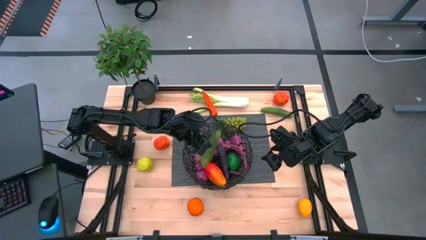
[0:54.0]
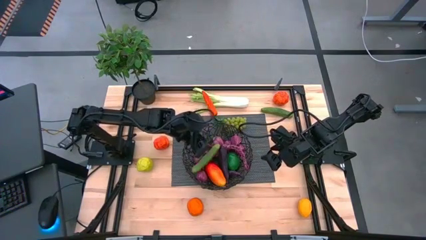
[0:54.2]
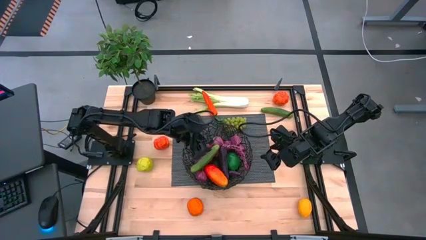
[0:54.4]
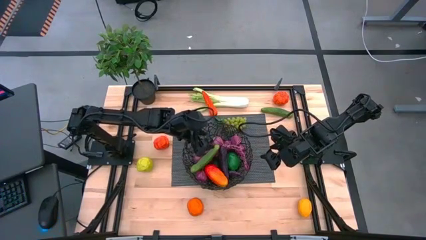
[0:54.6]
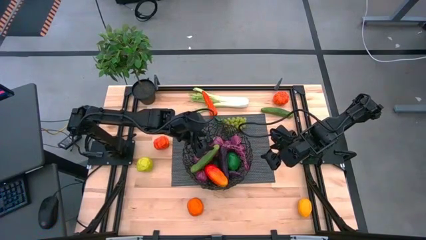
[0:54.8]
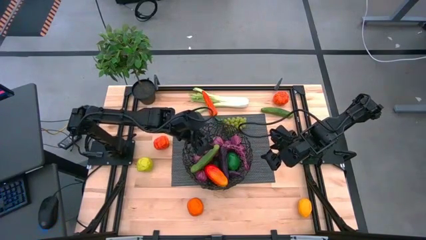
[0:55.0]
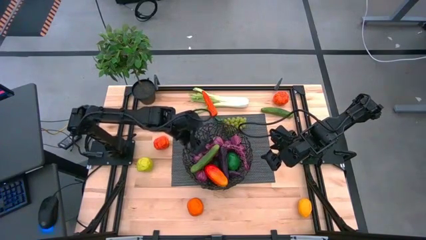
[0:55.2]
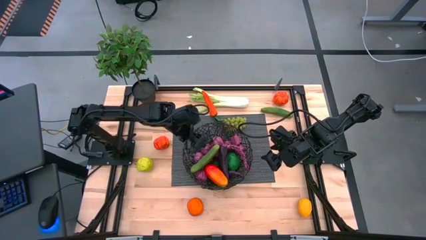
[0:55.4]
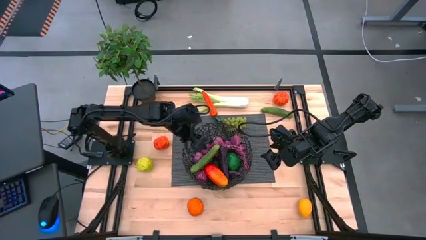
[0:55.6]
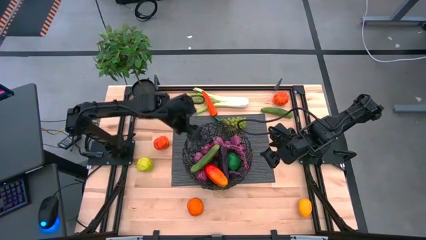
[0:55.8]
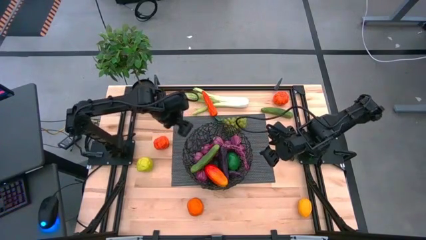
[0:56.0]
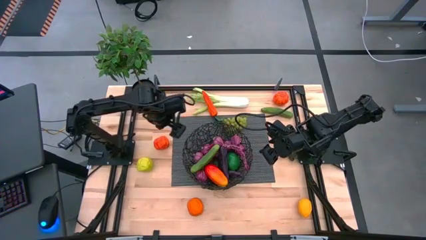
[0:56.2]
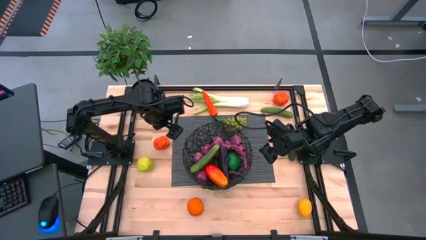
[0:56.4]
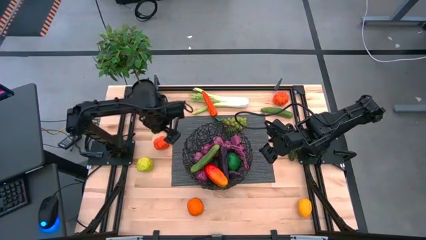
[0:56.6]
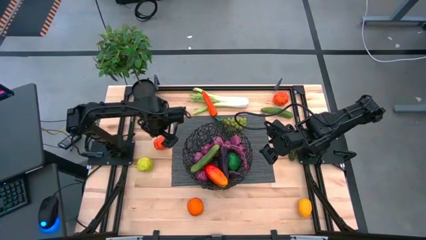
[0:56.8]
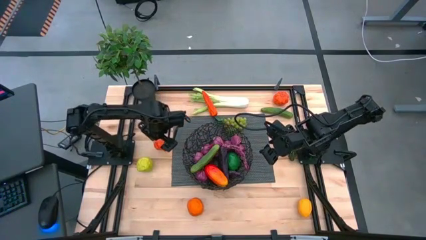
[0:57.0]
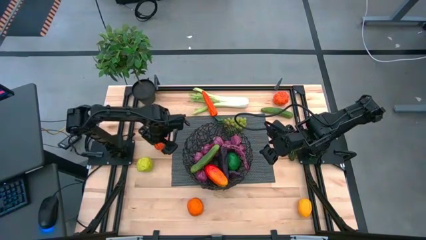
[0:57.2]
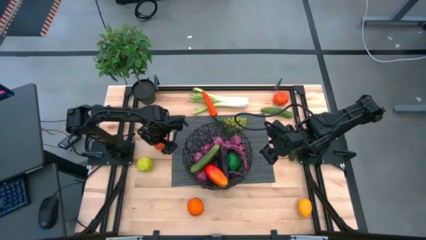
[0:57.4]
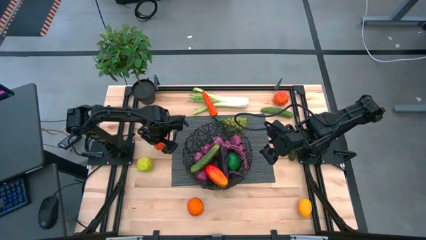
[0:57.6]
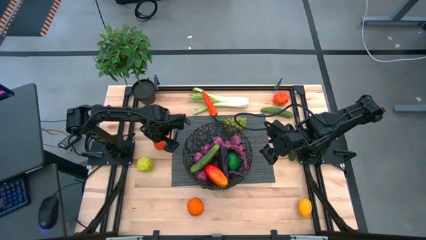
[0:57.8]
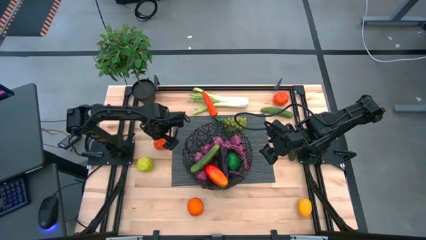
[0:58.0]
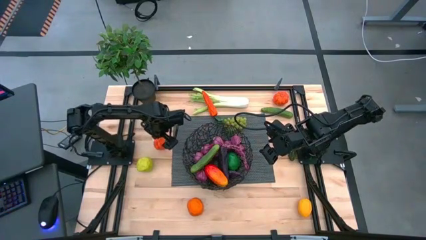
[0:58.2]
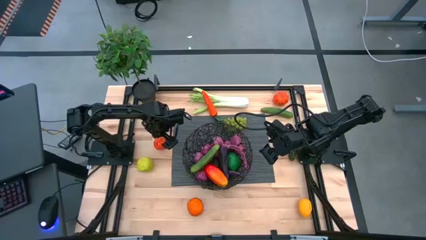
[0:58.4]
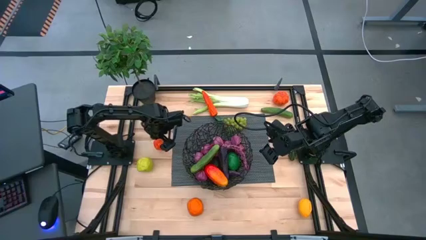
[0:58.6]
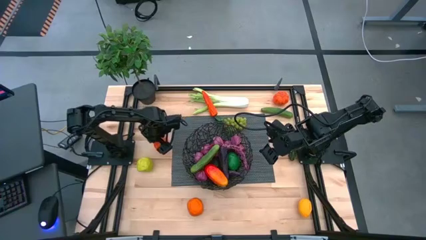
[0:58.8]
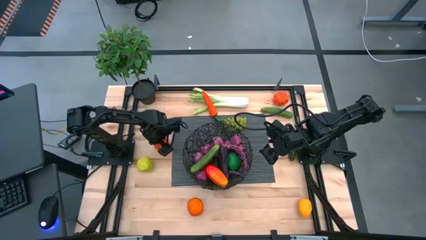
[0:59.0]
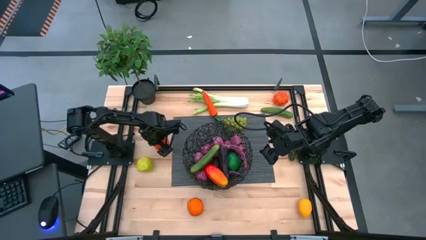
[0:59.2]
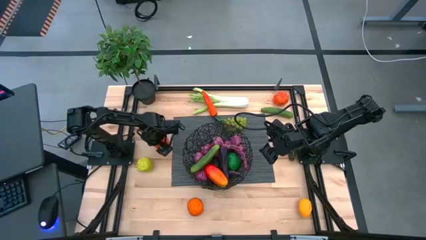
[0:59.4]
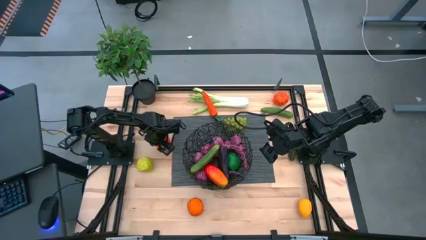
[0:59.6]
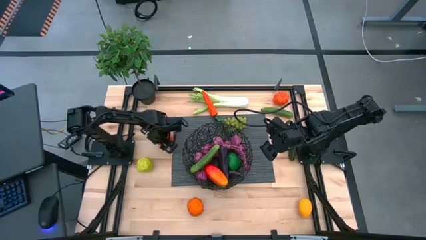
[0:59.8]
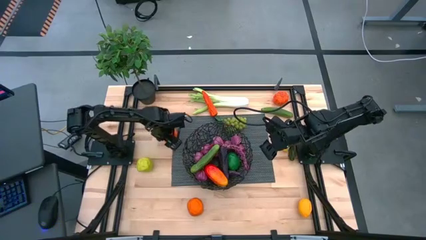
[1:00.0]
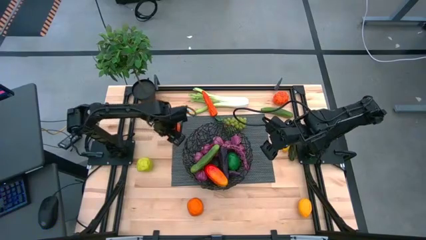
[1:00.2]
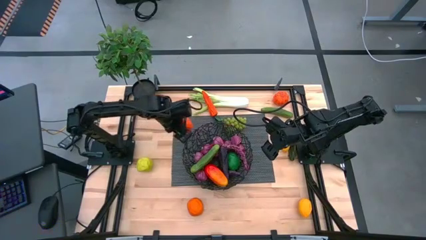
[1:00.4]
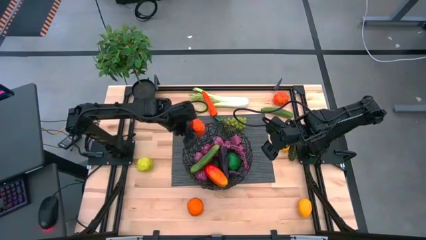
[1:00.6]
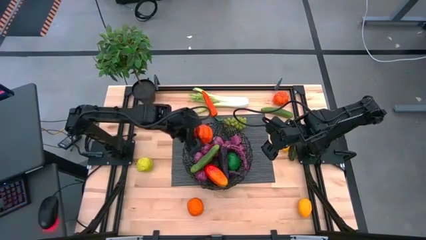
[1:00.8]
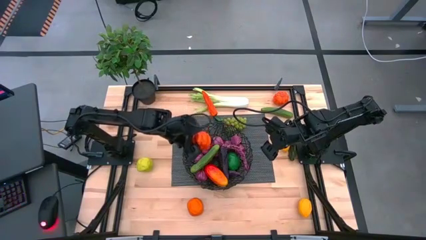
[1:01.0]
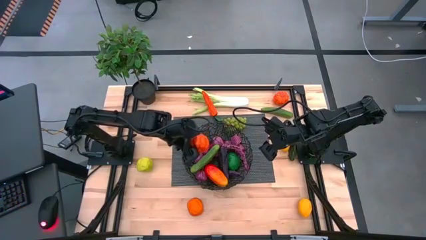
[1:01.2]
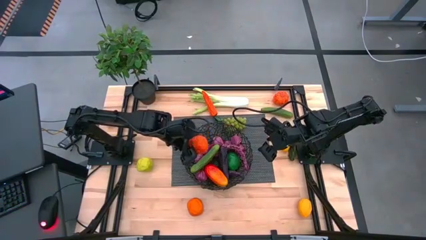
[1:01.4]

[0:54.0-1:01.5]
Task: Build produce basket
Put the left orange pumpkin into the black wire basket

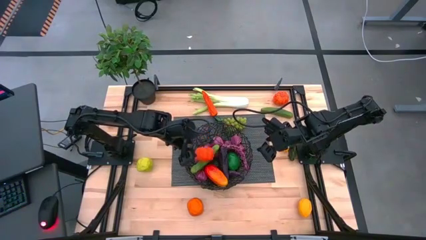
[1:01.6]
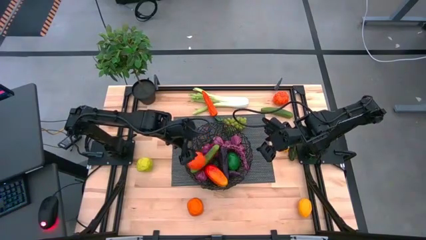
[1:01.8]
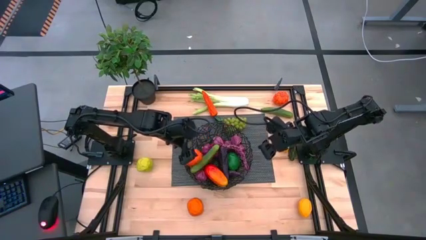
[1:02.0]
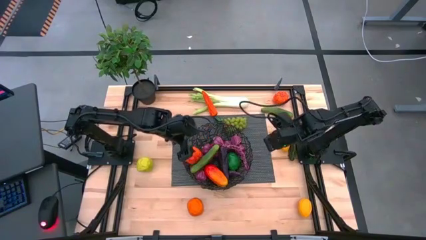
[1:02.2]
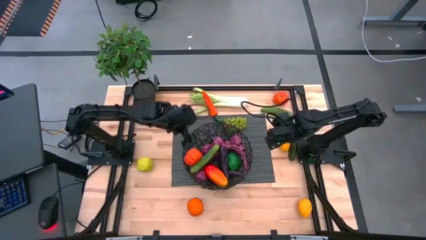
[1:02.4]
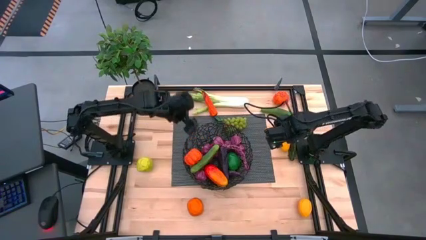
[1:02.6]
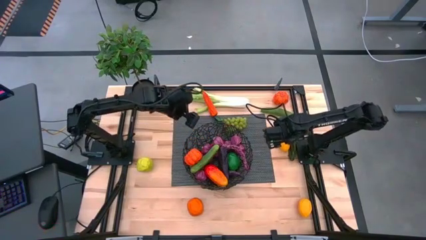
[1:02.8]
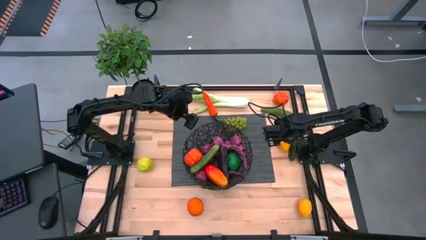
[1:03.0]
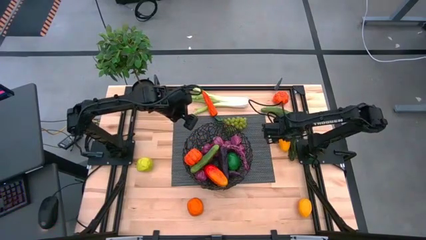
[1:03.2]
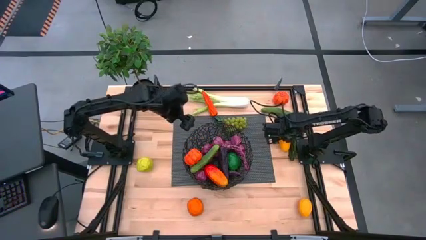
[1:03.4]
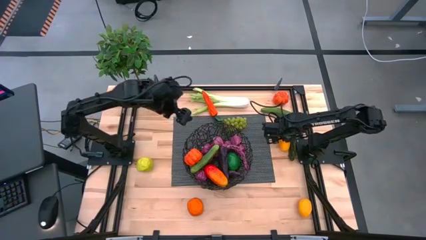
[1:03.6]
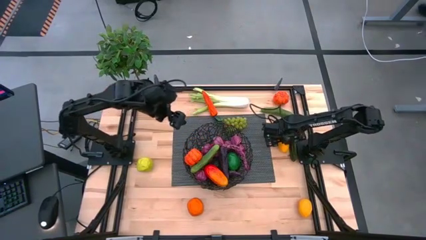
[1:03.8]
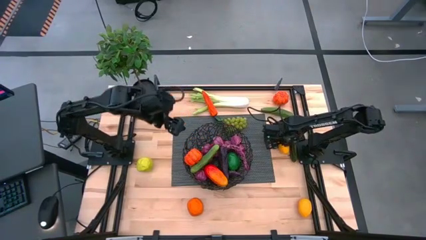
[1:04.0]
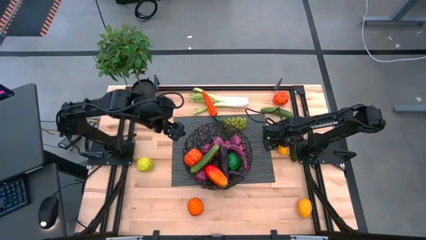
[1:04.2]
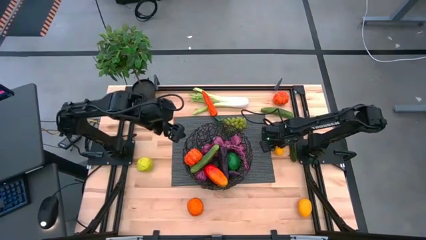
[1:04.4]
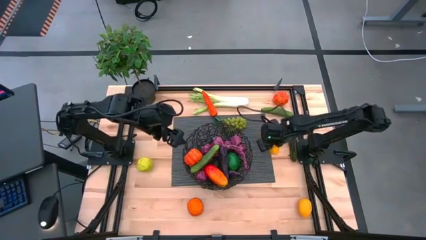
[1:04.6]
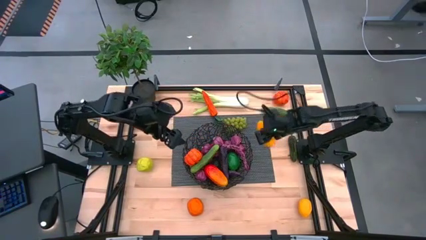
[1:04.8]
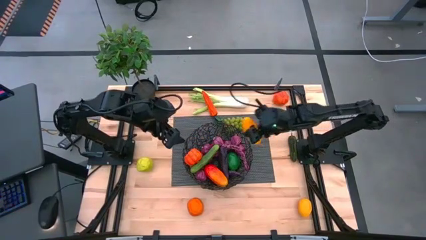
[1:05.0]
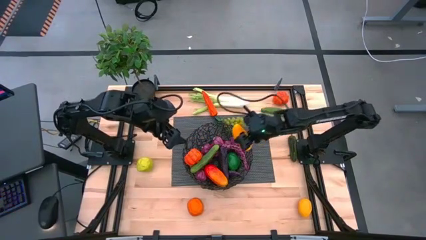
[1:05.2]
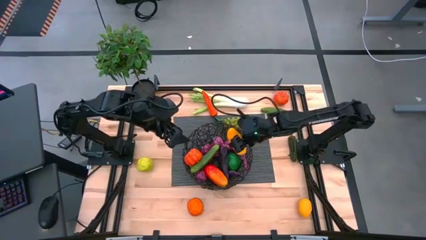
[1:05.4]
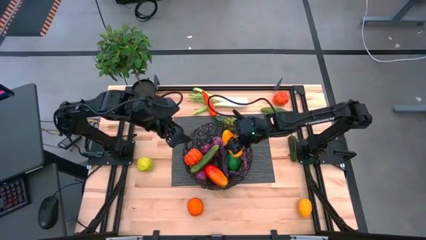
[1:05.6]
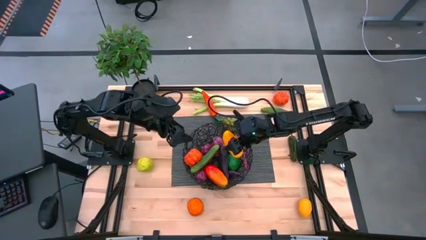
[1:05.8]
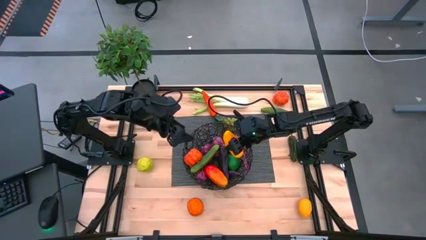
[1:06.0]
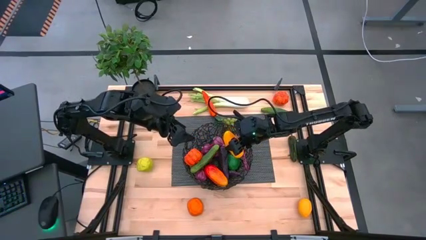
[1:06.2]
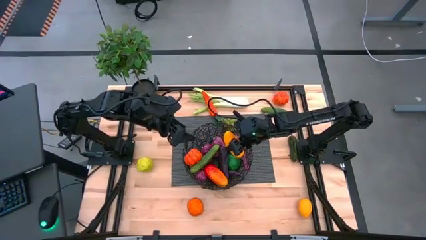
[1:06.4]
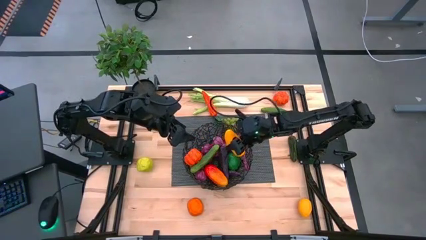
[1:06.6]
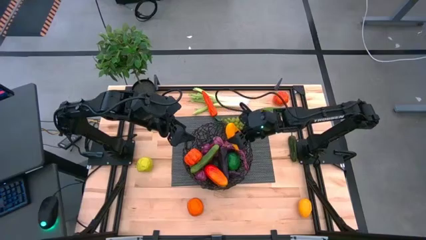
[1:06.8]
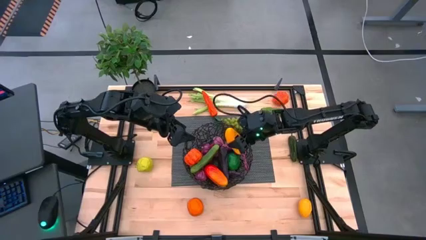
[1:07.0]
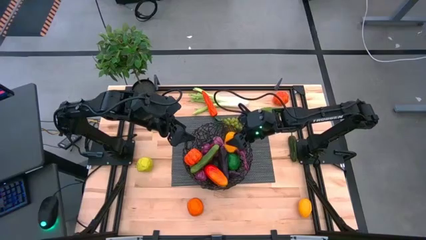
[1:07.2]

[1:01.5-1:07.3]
Put the yellow mango into the black wire basket

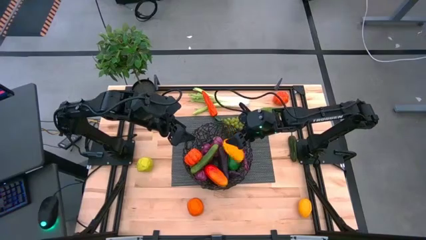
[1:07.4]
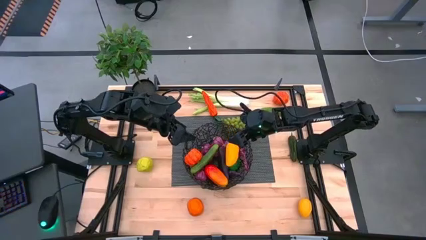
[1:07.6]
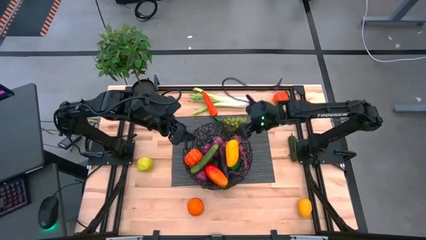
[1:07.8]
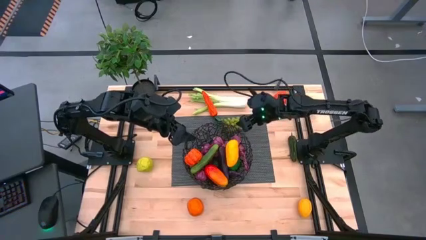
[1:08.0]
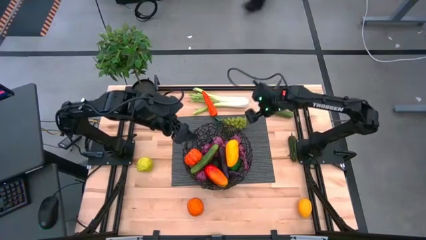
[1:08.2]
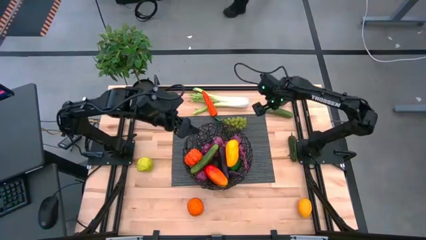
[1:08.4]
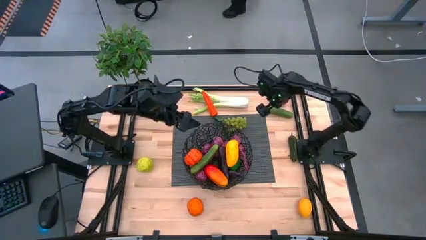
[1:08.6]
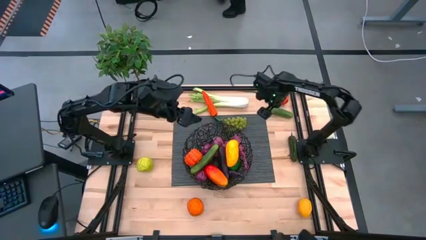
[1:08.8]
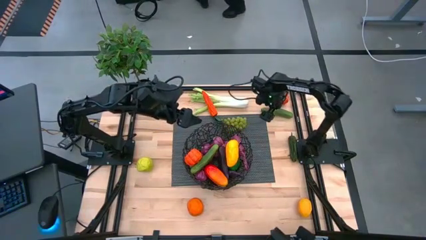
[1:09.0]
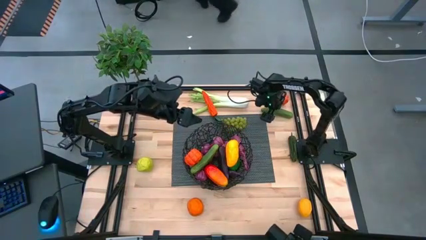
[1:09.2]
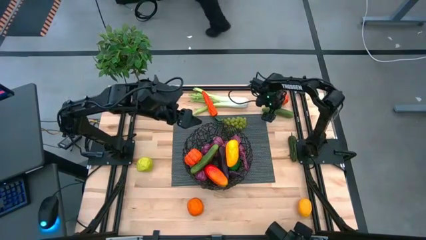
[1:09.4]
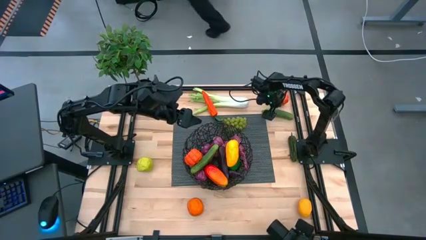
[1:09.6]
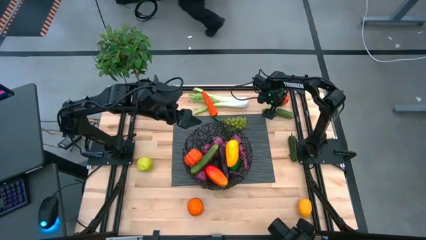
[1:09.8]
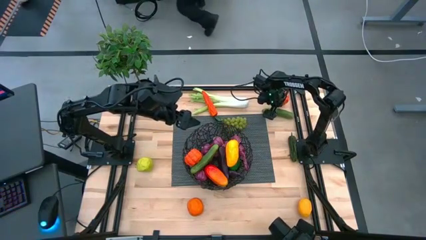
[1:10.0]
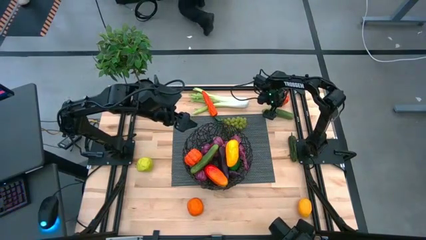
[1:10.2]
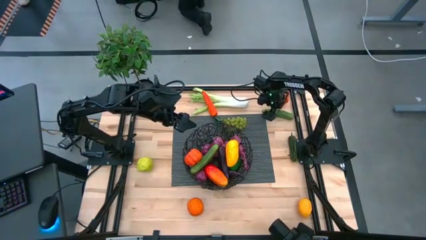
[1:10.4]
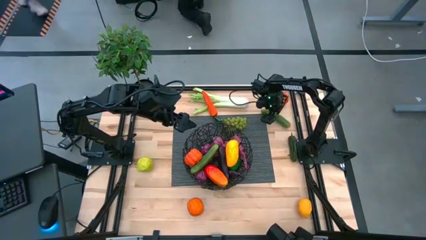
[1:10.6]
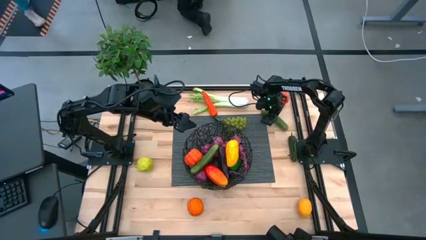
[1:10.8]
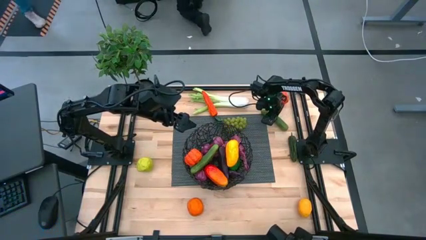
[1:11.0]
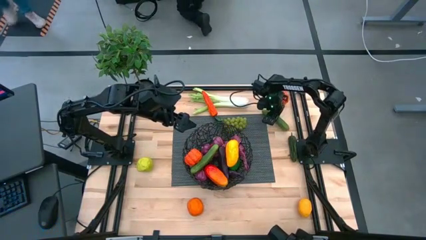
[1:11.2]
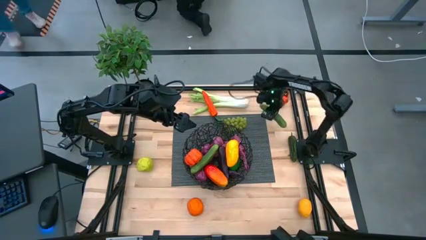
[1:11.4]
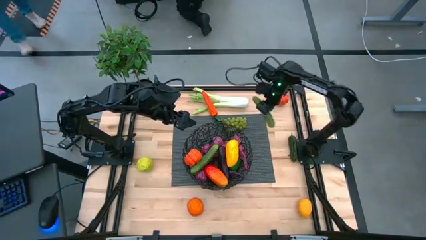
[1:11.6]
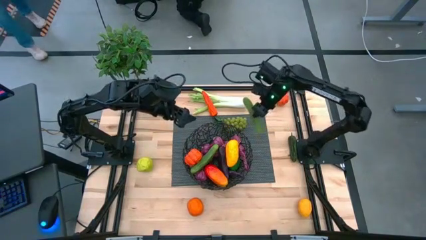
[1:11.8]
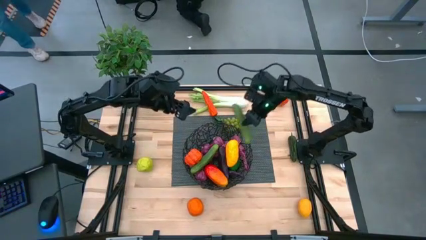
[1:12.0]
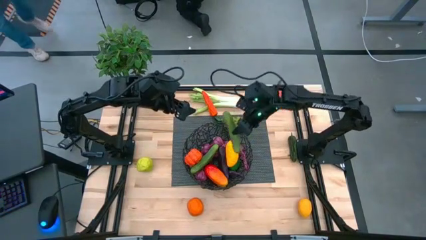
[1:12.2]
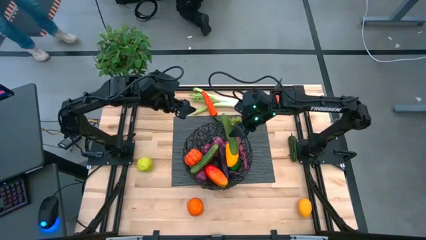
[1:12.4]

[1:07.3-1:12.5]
Put the green cucumber into the black wire basket
